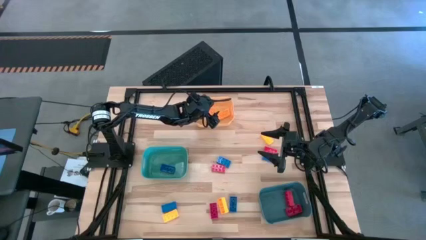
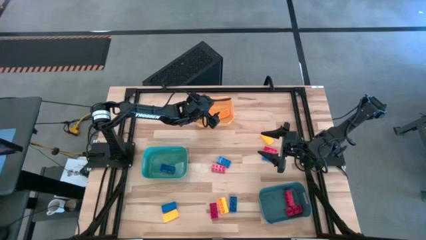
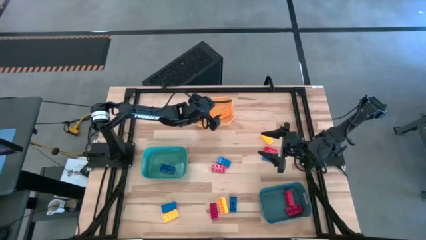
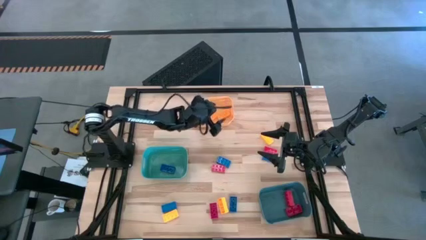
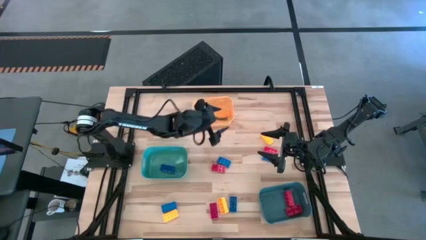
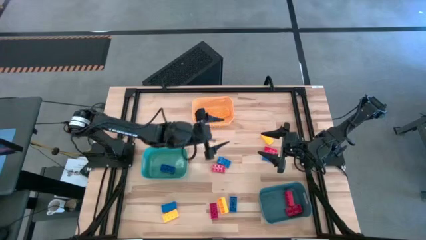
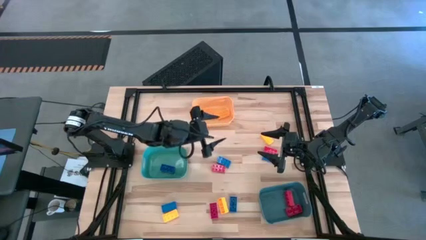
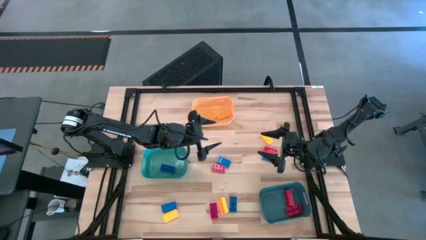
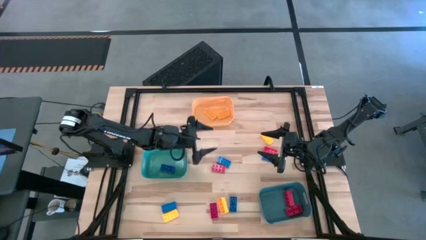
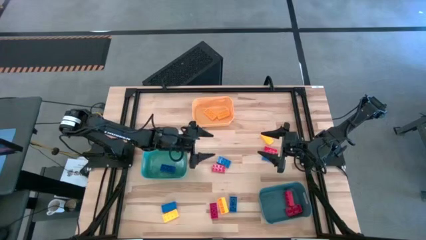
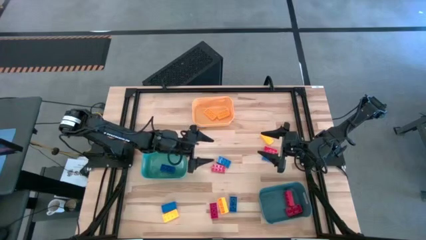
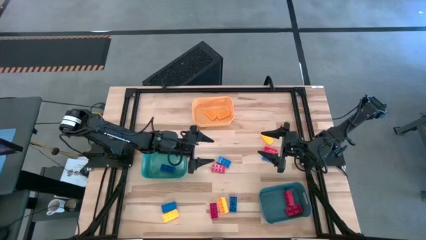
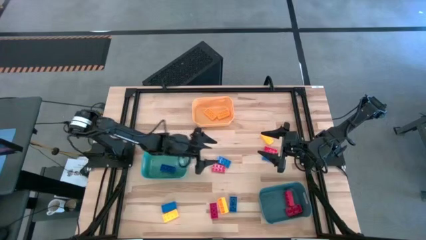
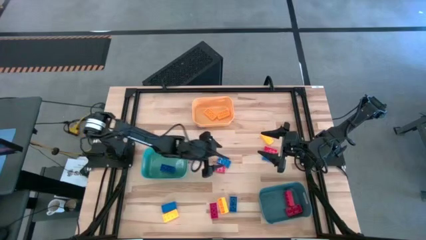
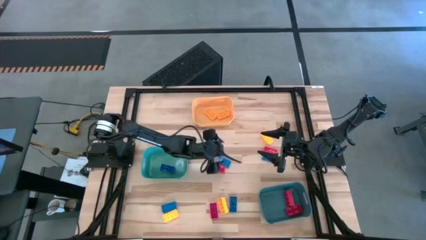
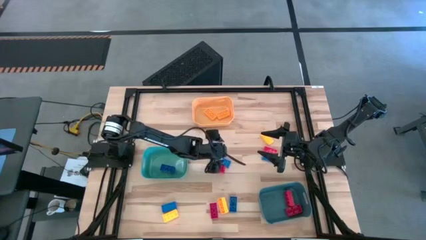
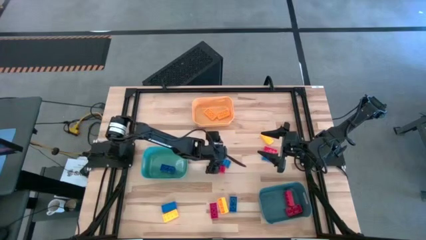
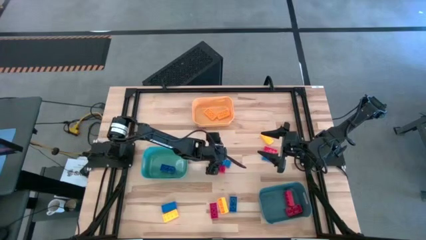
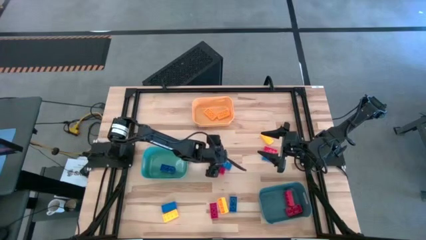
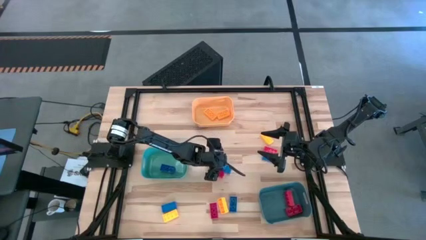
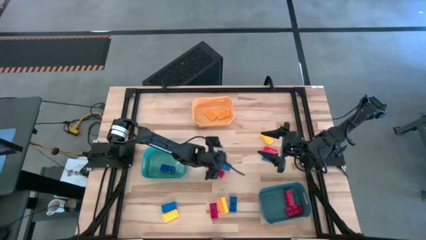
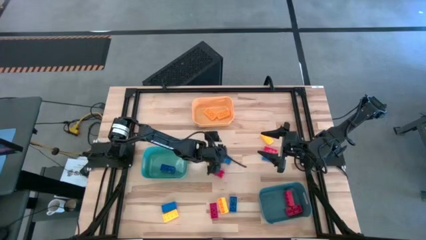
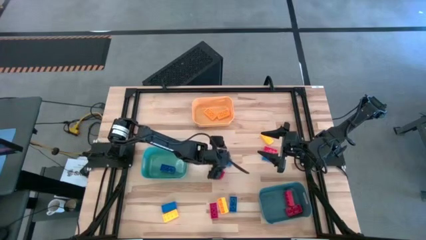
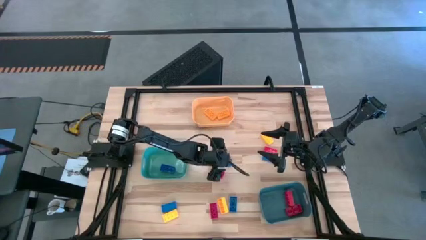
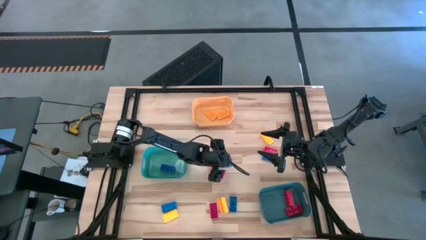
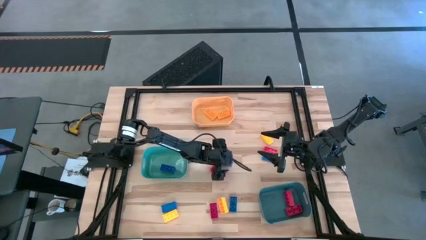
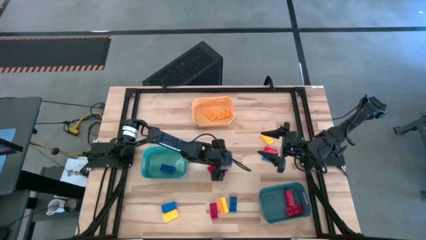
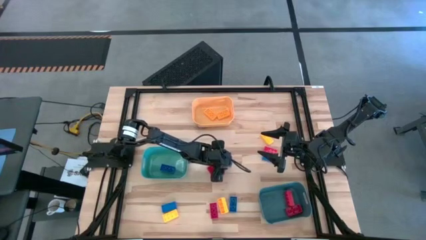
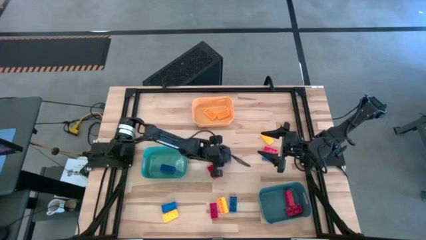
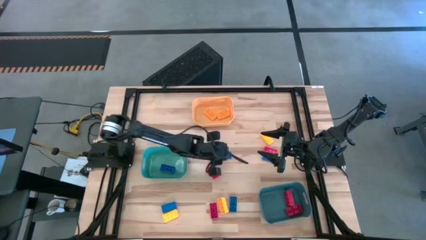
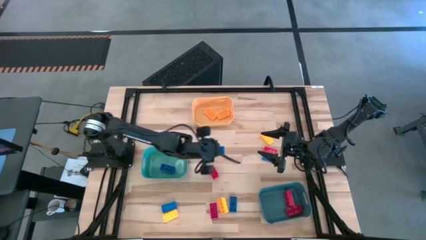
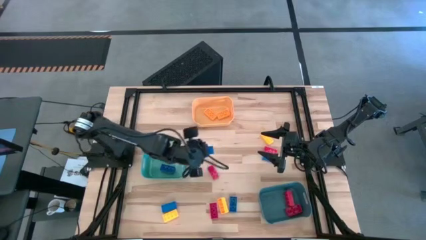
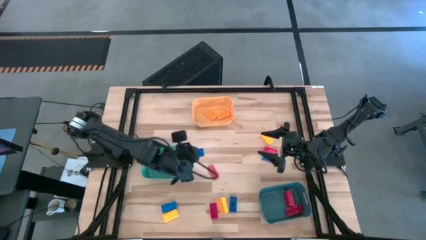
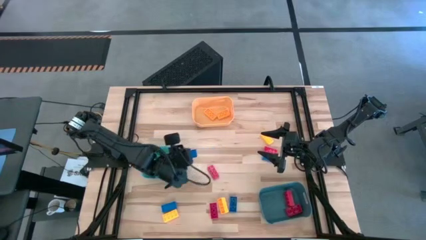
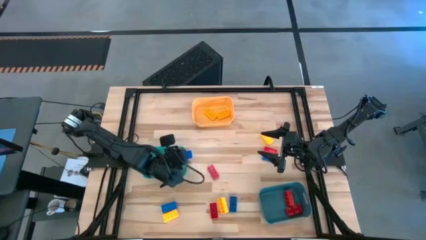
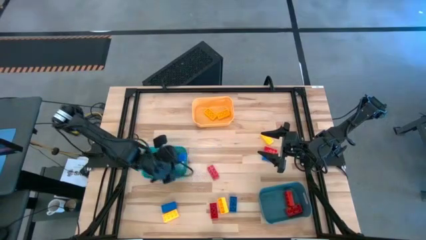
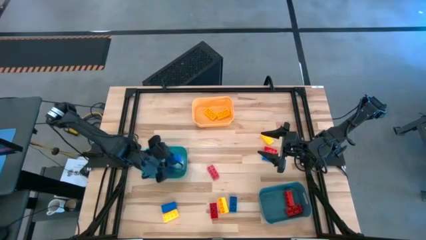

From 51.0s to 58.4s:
Task: Sort & place blocks by color
Put the blue game piece into the green bin

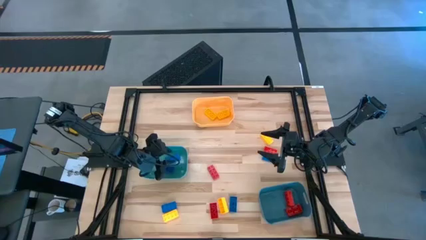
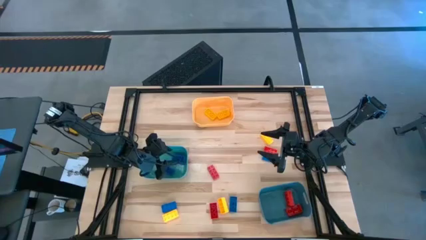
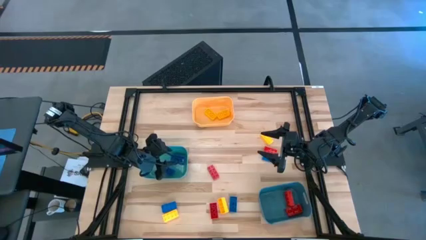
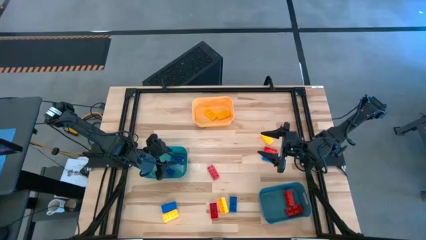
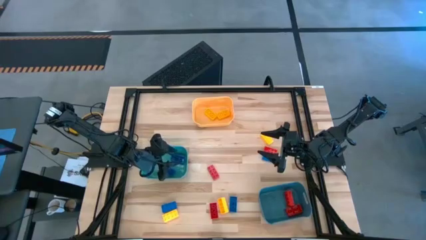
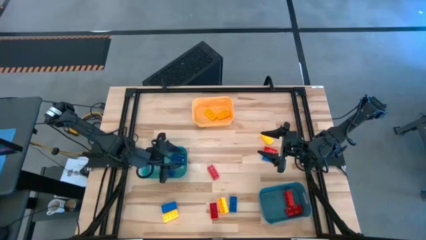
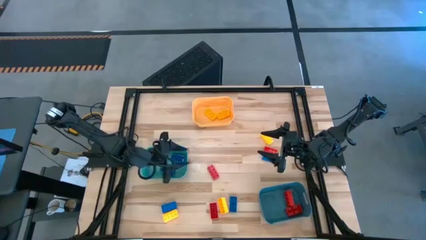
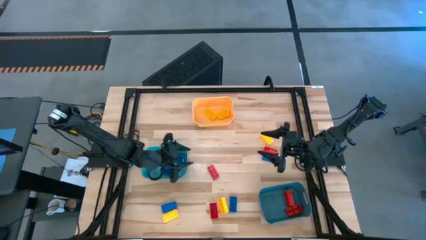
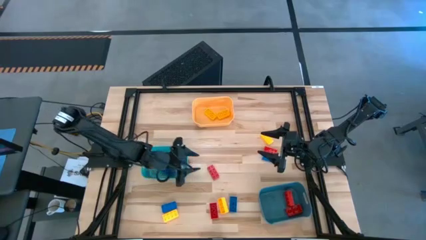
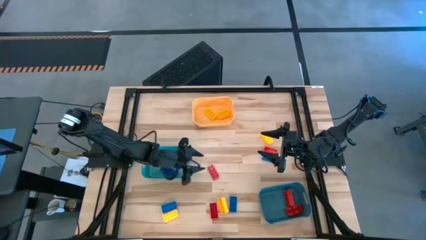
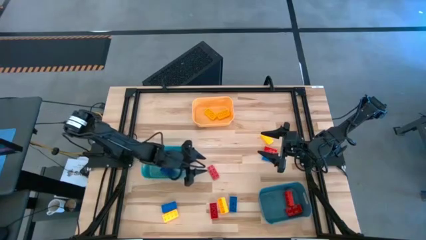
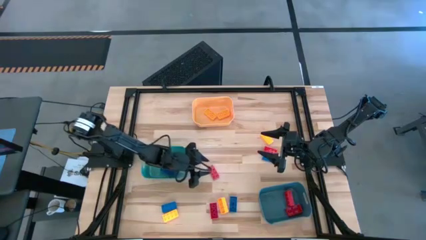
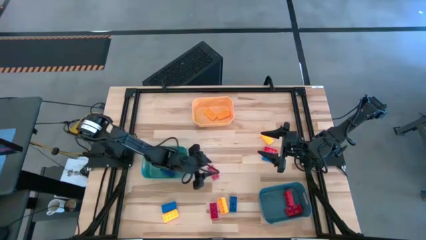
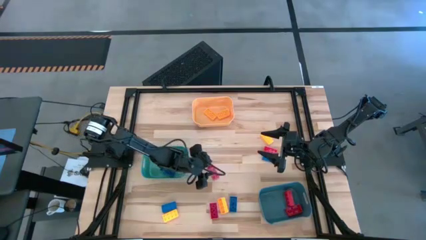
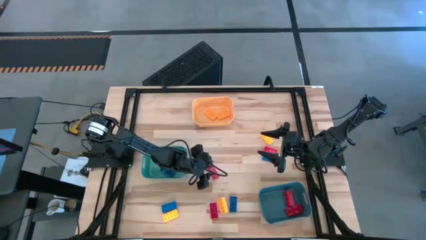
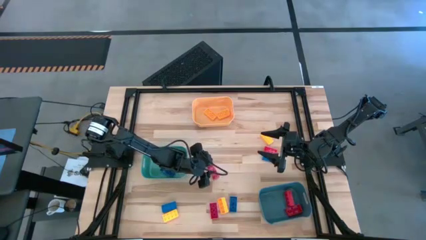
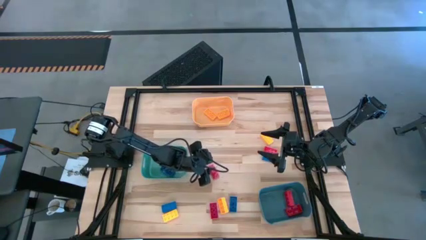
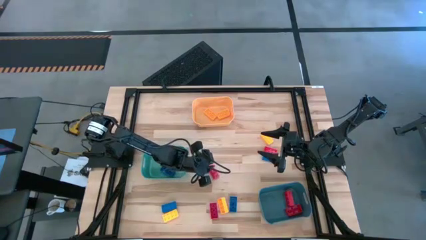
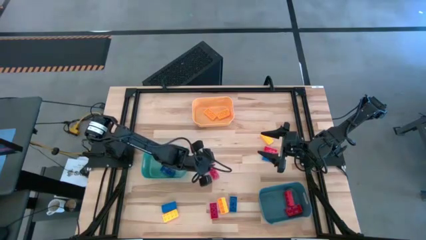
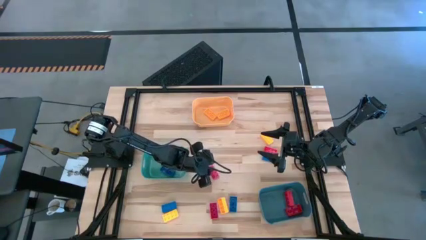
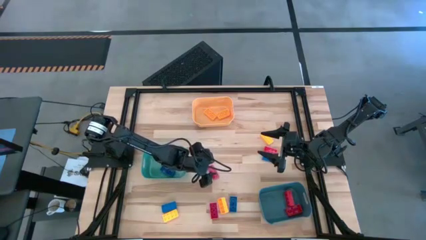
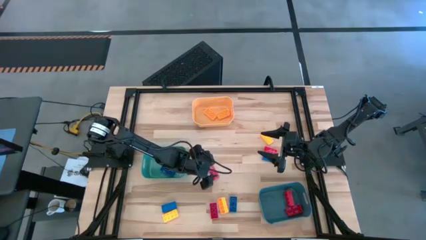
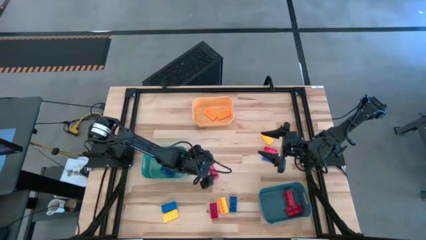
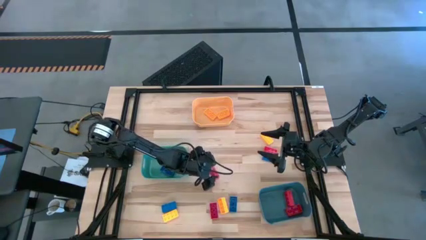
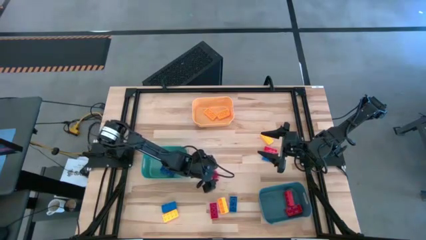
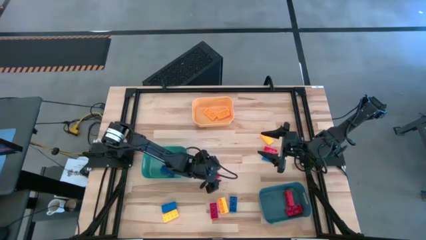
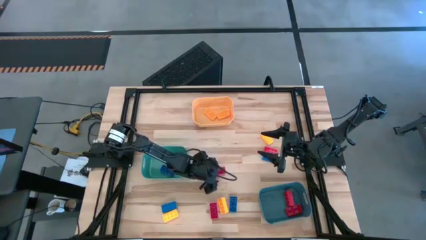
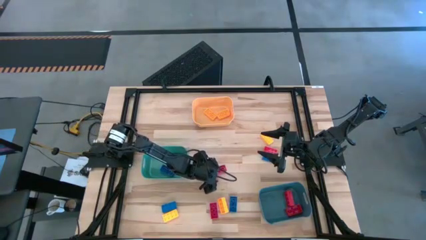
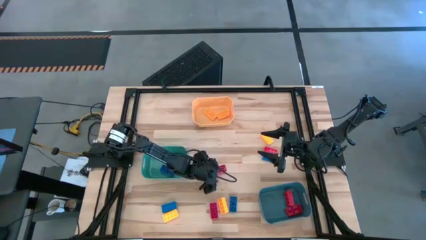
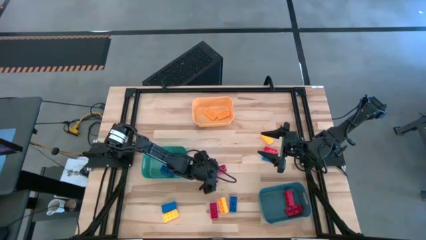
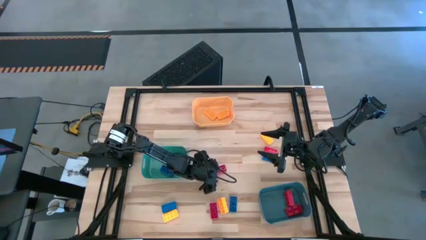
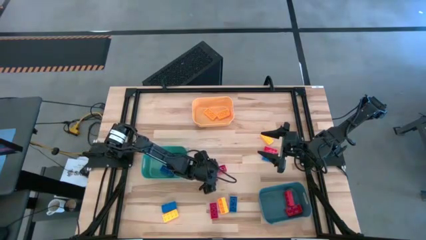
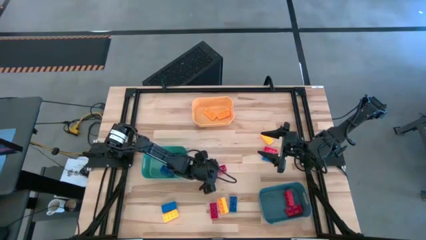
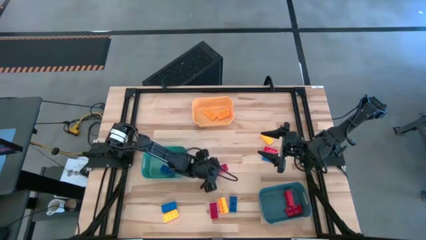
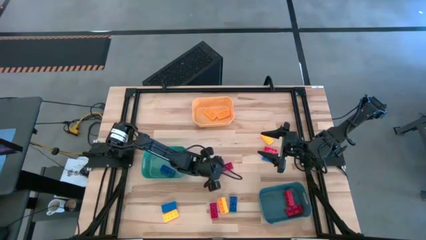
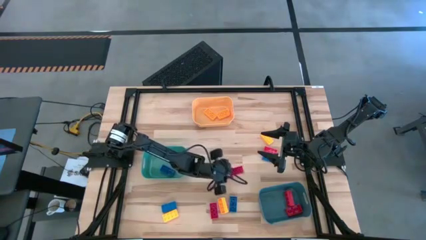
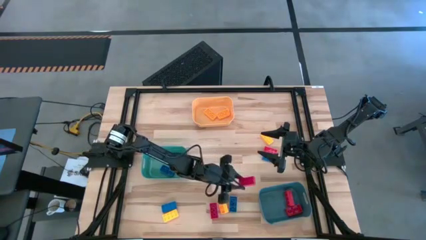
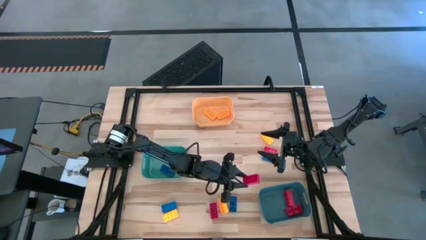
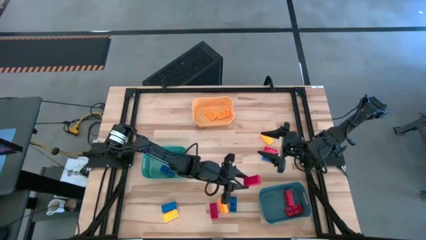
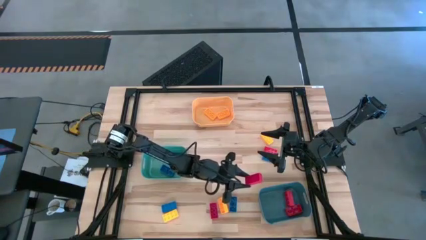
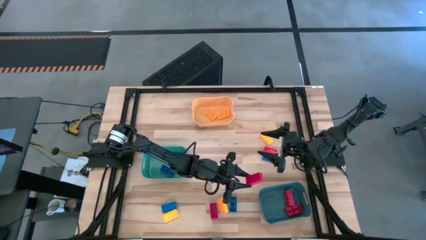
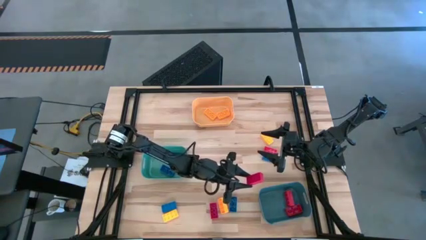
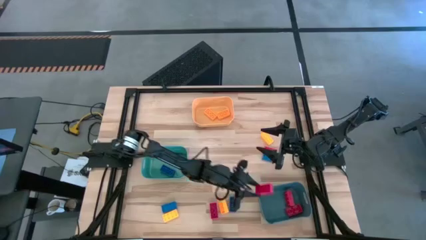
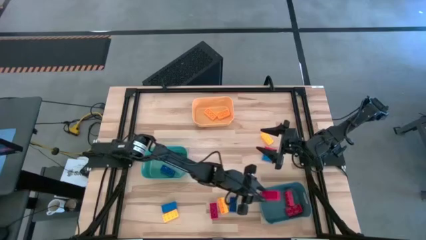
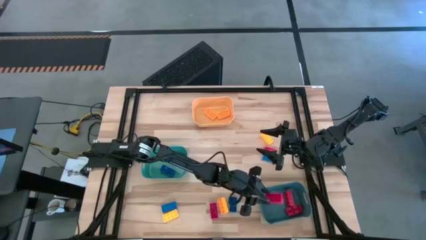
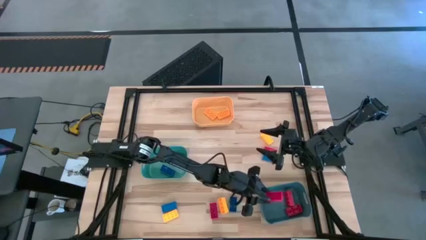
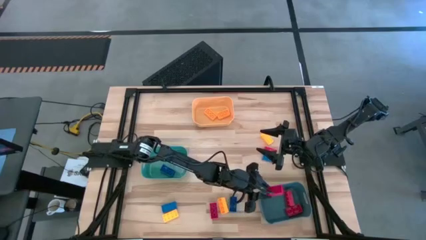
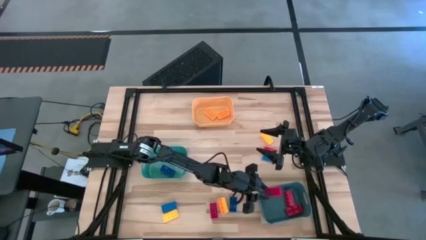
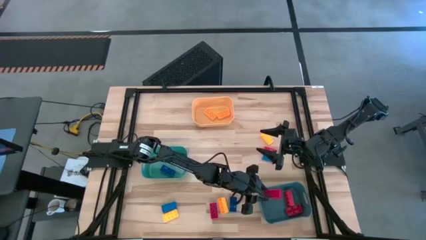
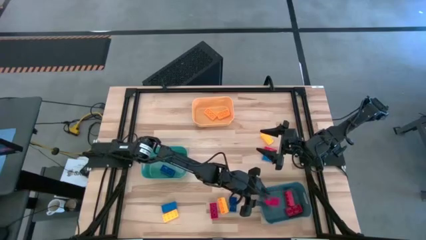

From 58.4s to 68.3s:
Put the red game piece into the blue bin
